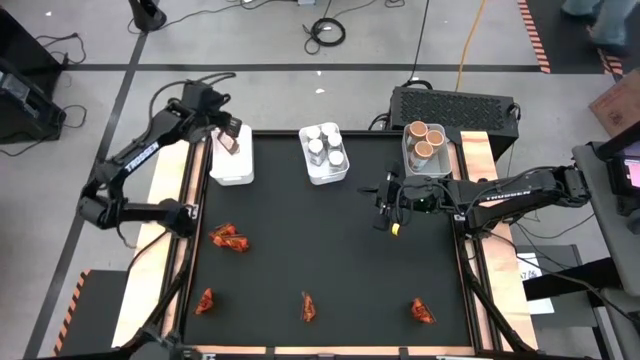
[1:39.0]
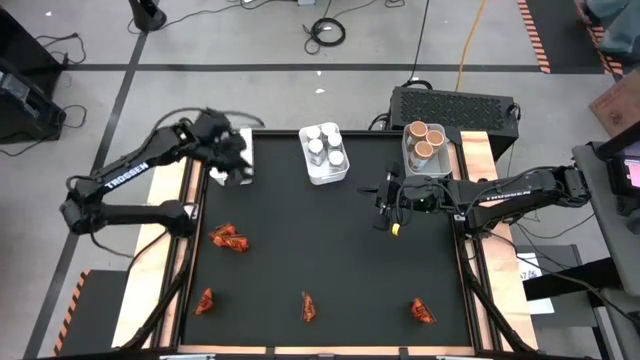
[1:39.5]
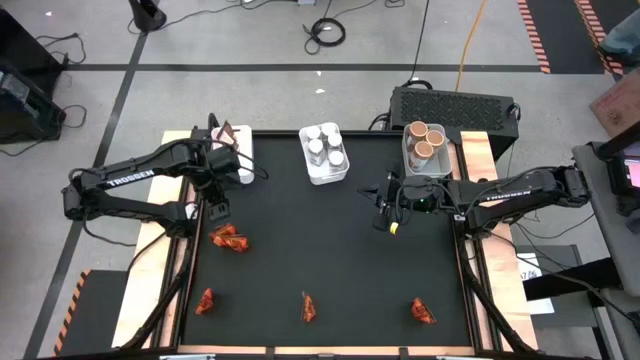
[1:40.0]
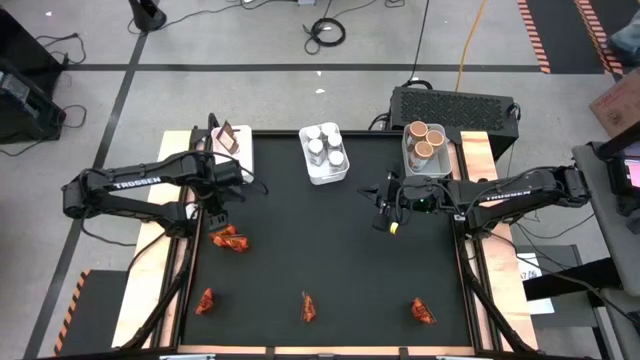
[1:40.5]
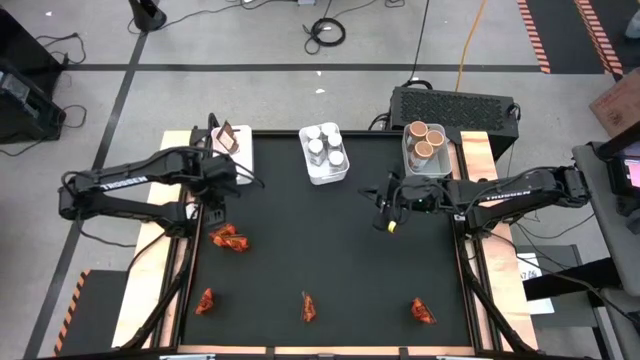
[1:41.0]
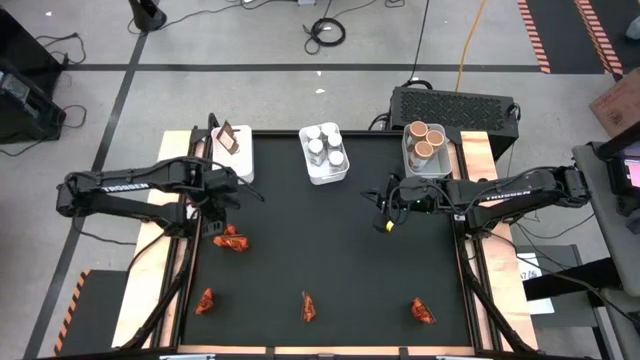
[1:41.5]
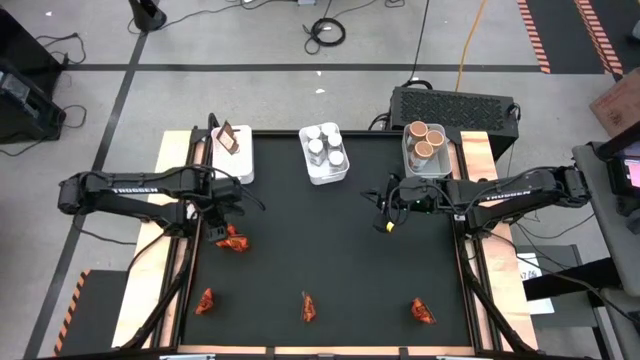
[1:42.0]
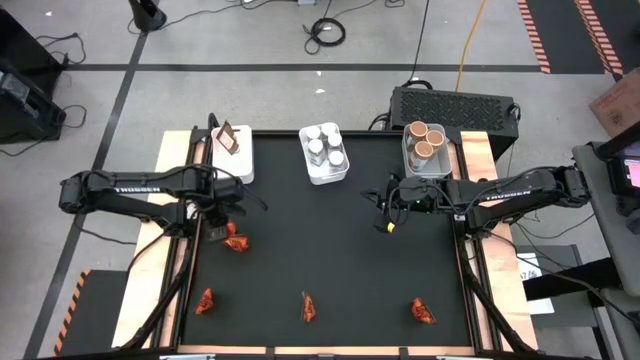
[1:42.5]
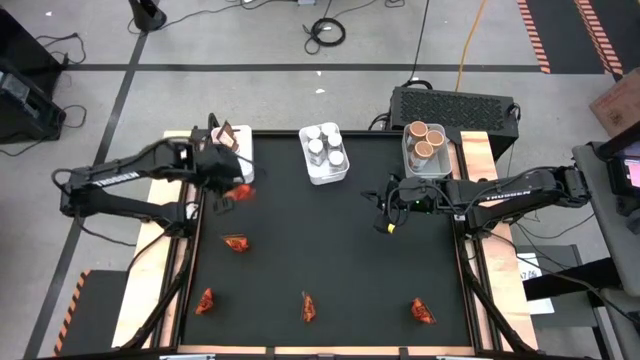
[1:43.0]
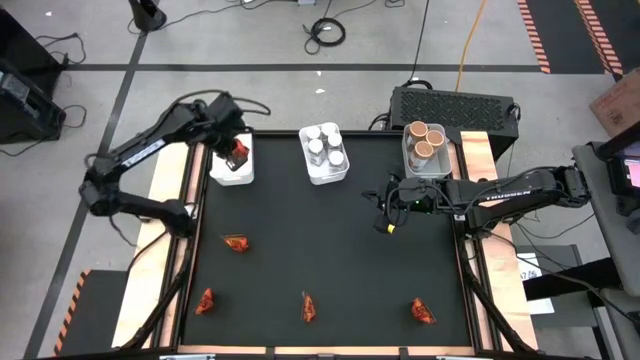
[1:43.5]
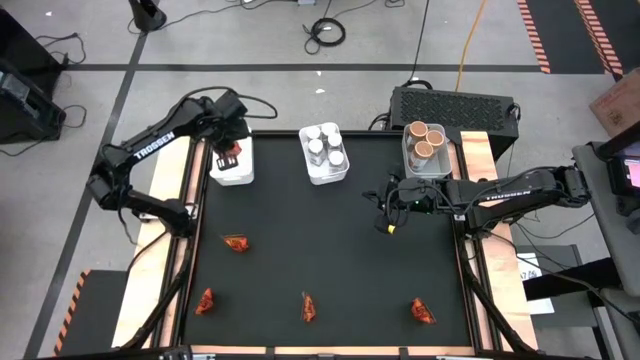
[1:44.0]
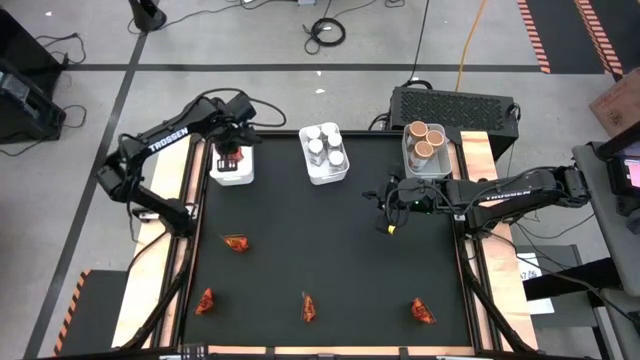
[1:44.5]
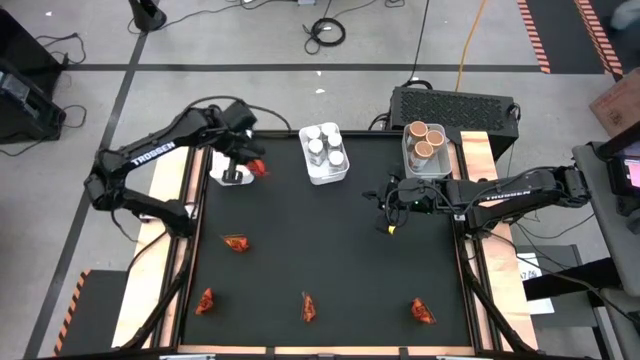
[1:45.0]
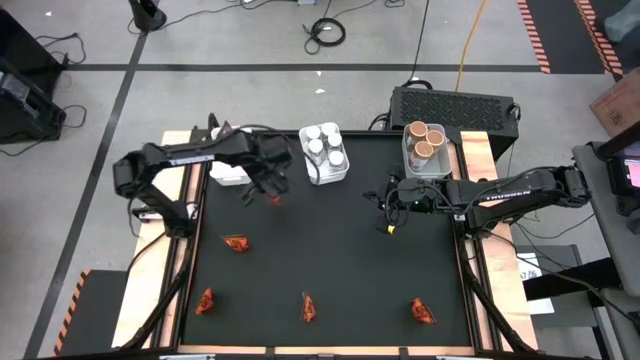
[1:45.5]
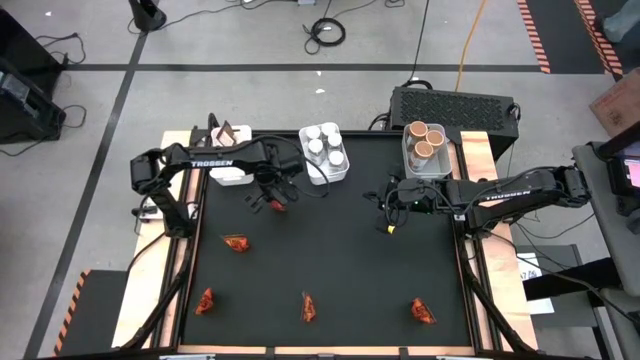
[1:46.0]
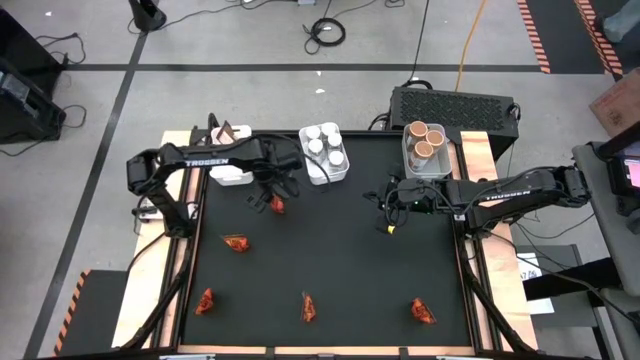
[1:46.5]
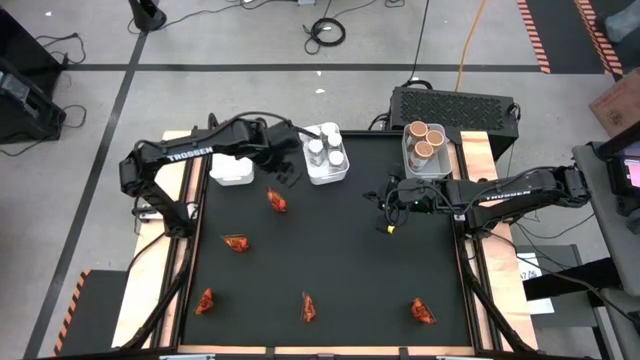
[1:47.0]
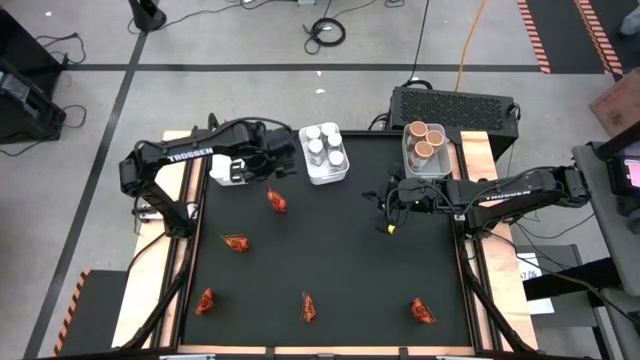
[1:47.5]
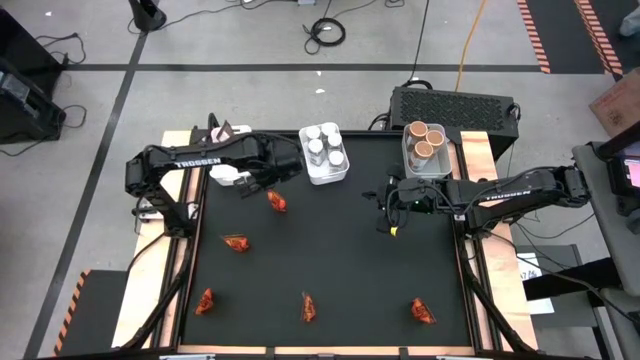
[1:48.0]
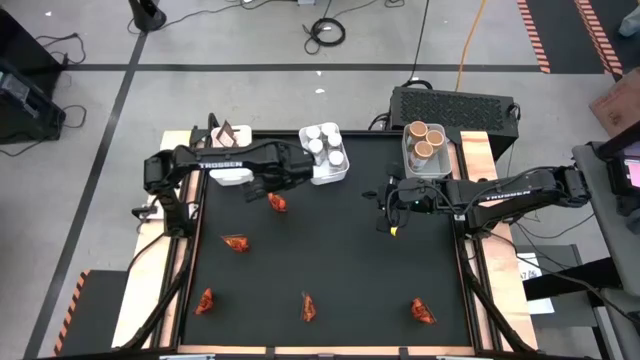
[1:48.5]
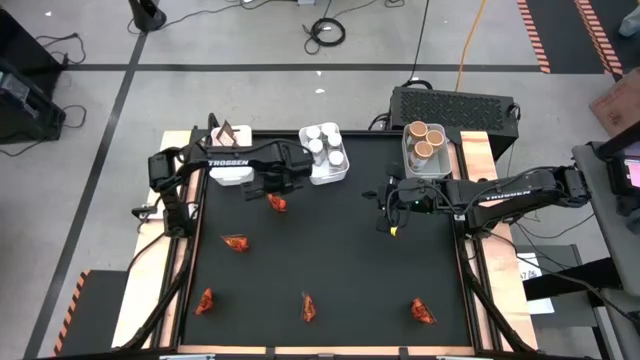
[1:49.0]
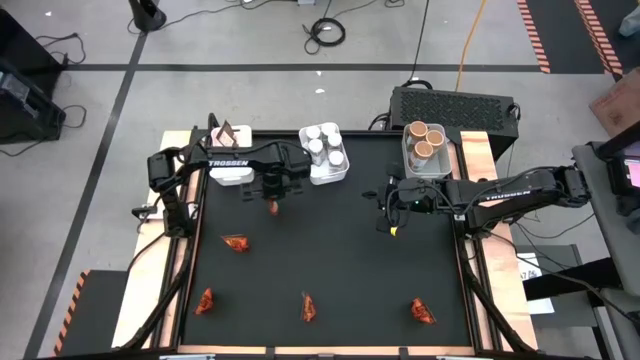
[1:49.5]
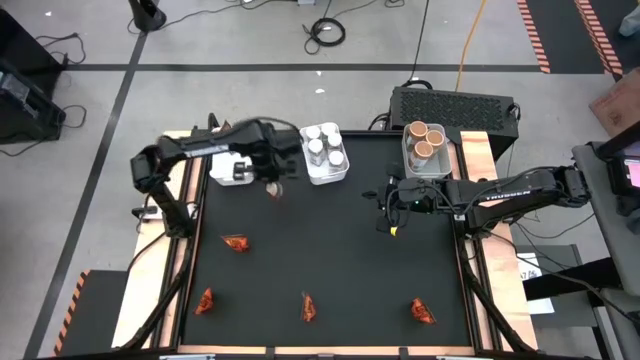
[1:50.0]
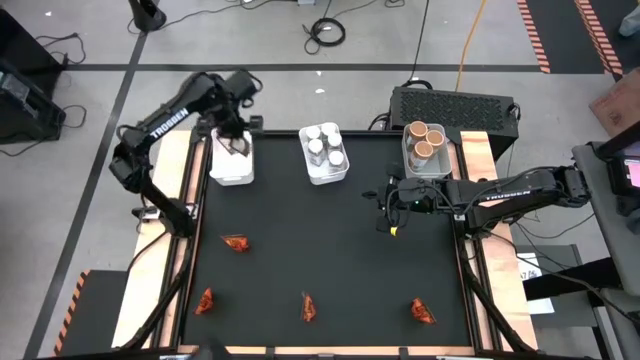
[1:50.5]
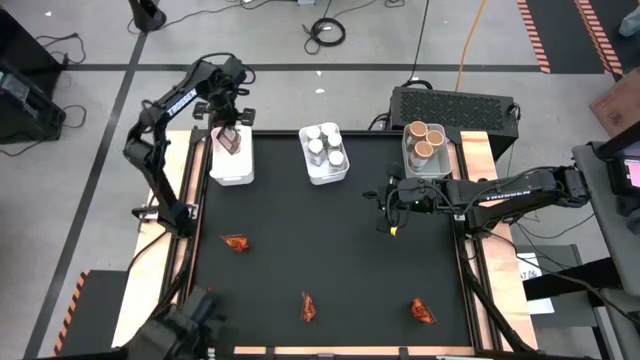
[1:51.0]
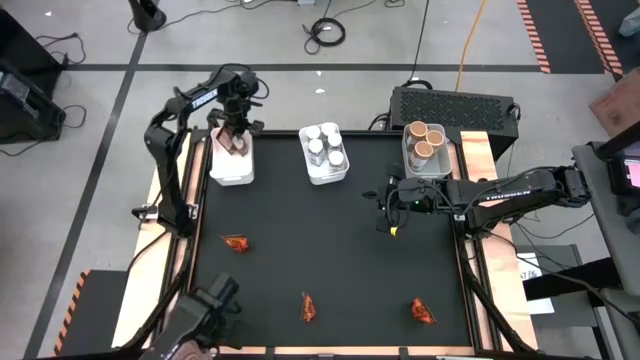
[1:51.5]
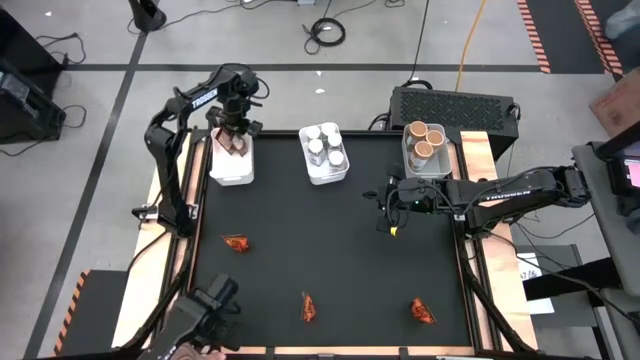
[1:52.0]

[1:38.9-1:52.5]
Task: Sort spices by type
Put the orange seasoning pack into the left white bin

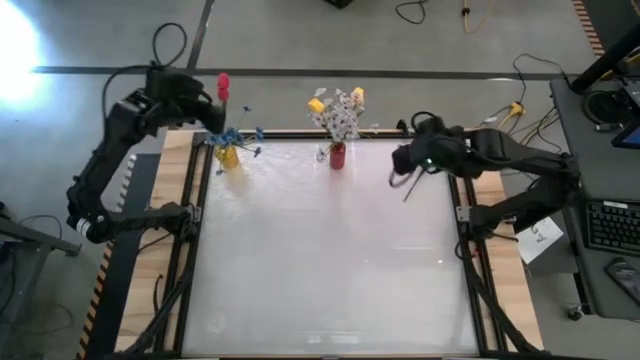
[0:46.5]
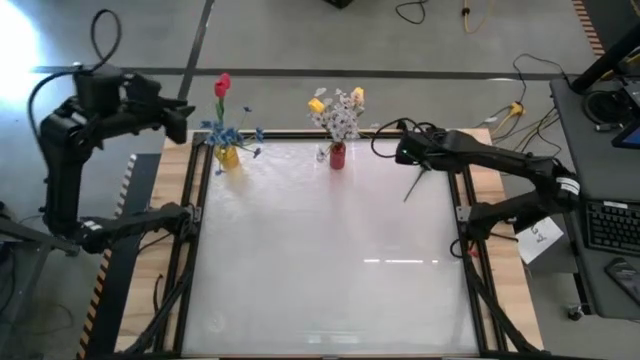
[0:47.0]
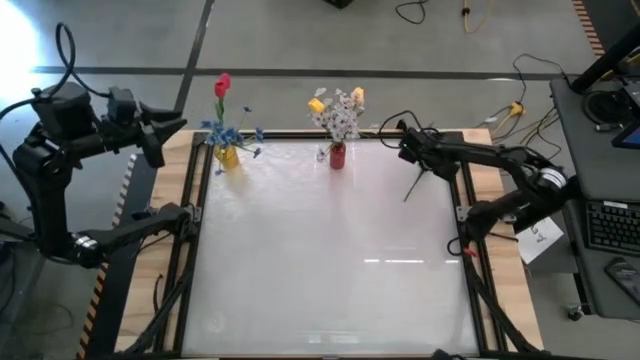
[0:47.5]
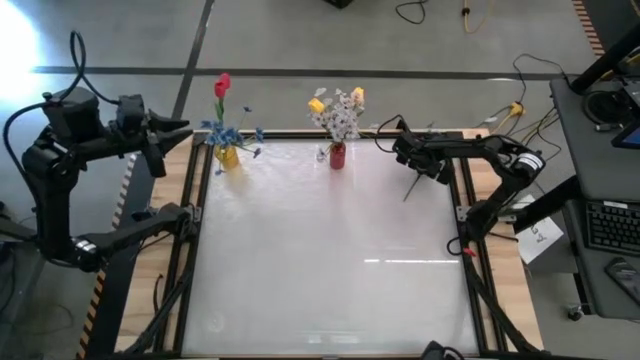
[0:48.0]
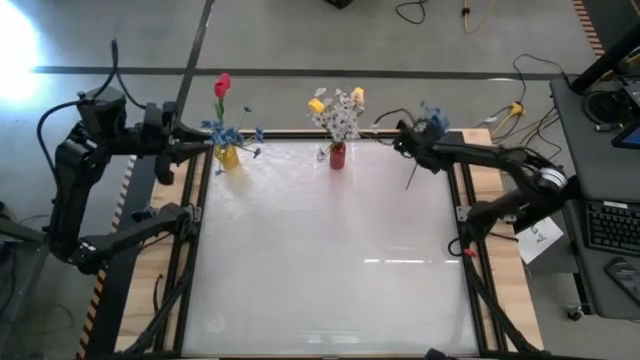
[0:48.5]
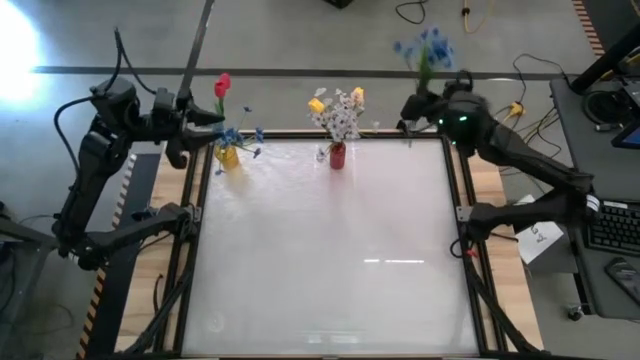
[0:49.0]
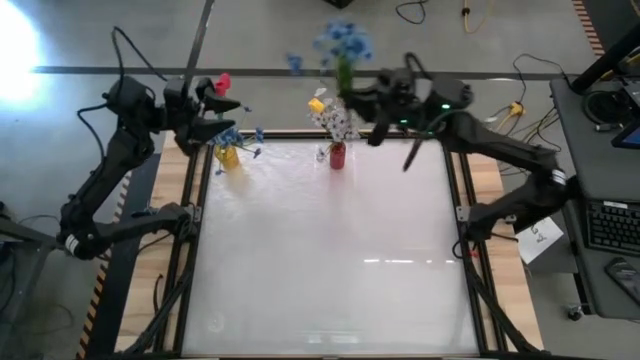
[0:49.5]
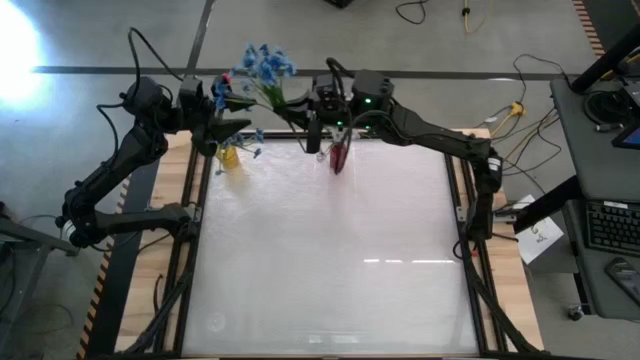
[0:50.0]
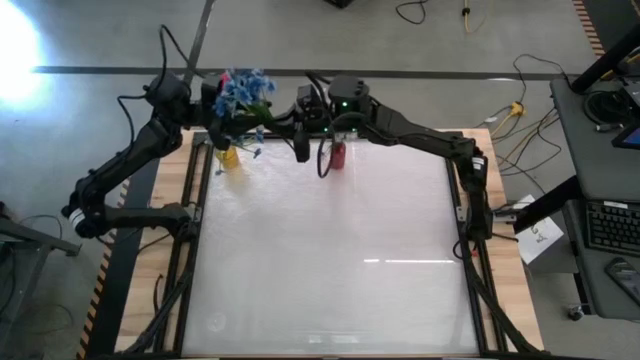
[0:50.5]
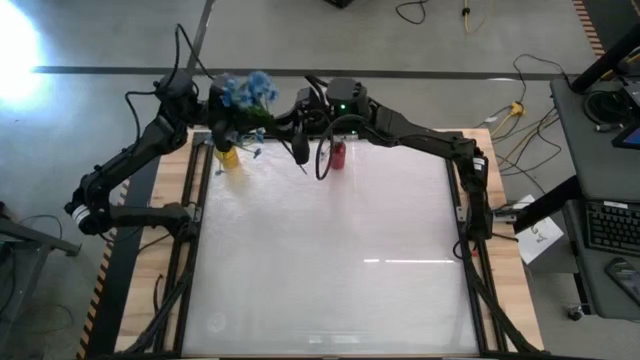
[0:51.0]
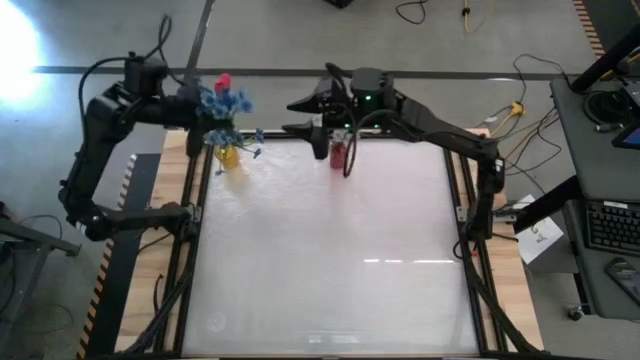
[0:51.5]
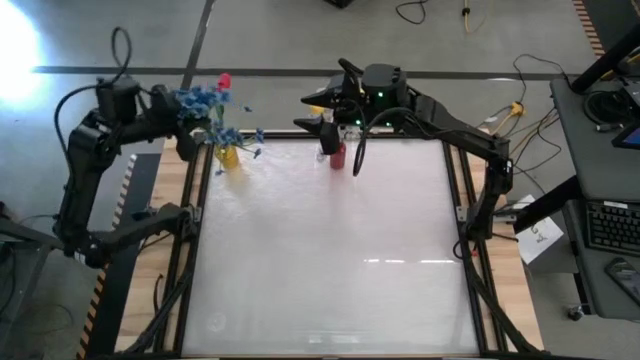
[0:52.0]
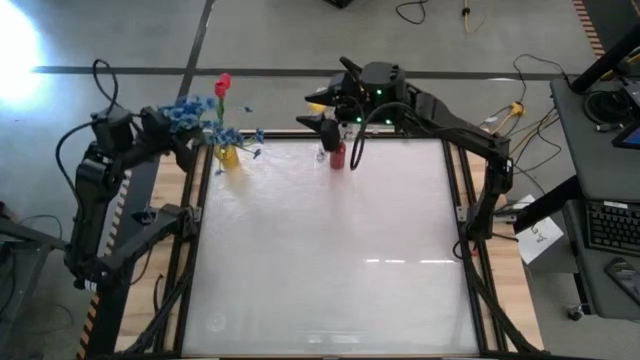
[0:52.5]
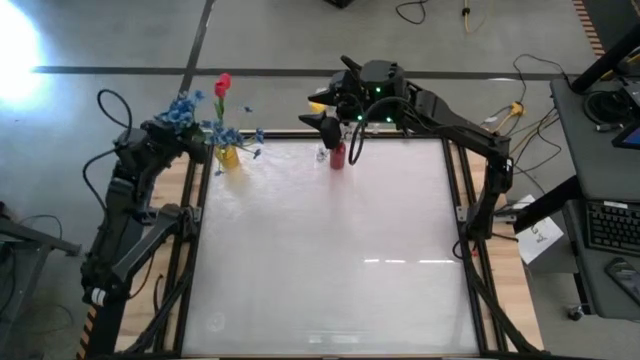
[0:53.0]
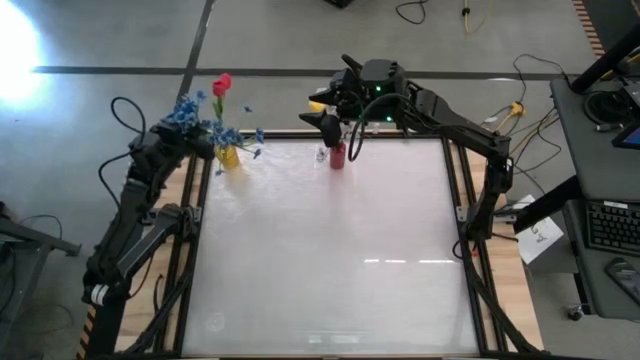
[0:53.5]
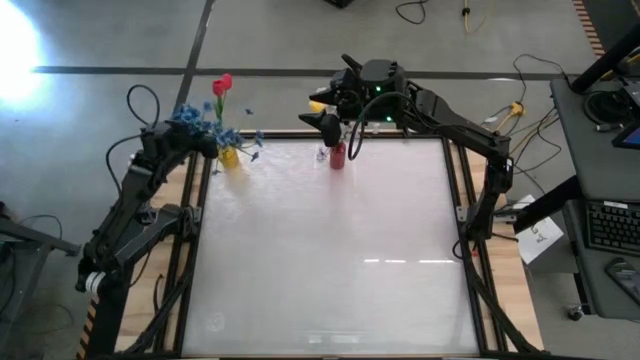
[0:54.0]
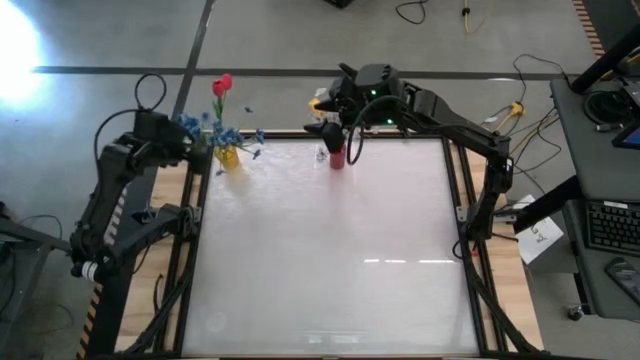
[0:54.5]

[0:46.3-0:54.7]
Task: Sort flowers into vase by color
Put the blue flowers into the yellow vase
